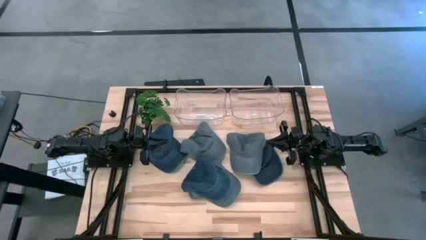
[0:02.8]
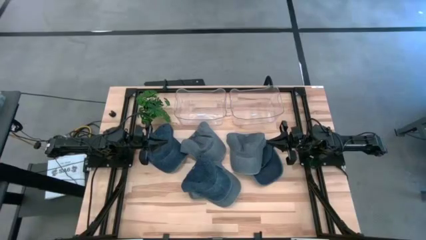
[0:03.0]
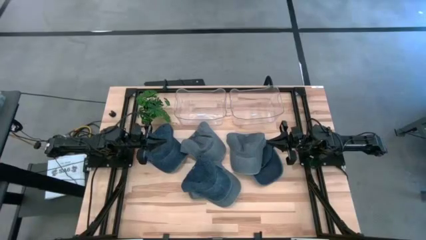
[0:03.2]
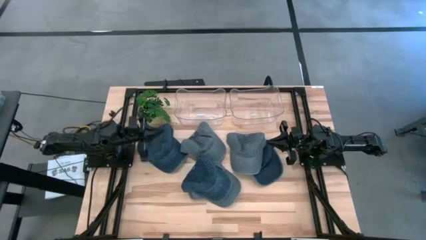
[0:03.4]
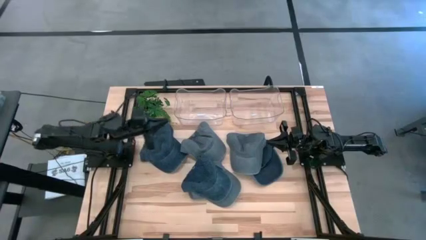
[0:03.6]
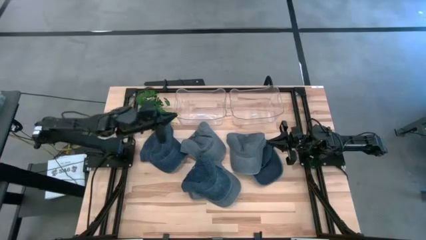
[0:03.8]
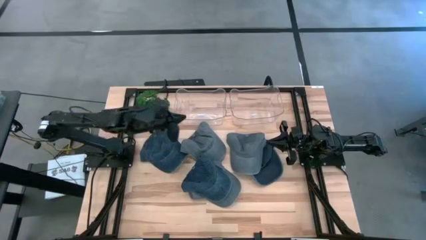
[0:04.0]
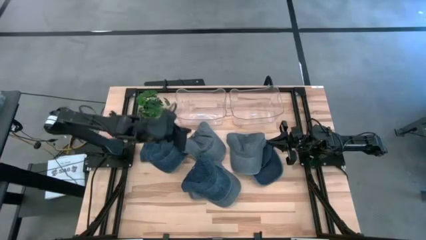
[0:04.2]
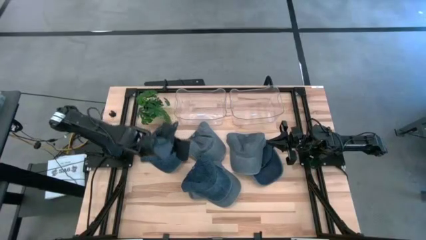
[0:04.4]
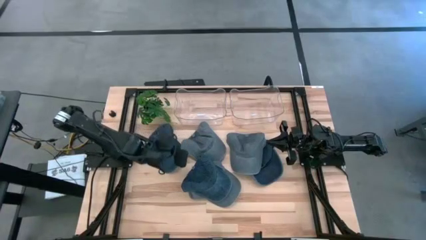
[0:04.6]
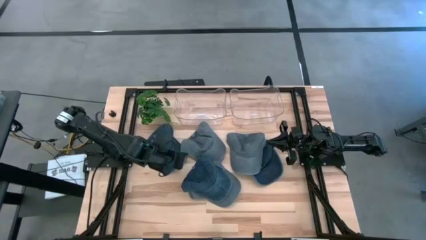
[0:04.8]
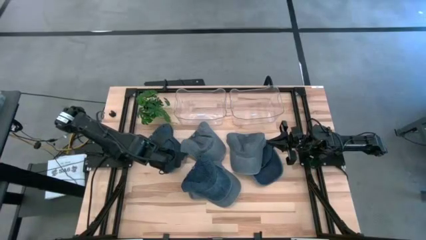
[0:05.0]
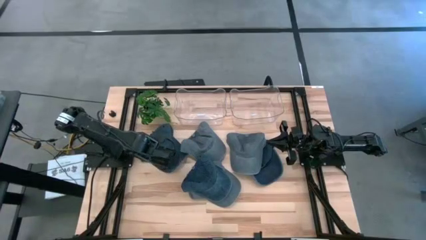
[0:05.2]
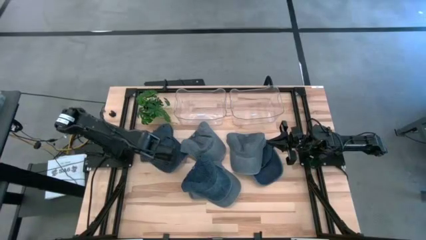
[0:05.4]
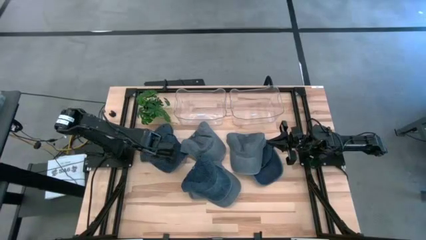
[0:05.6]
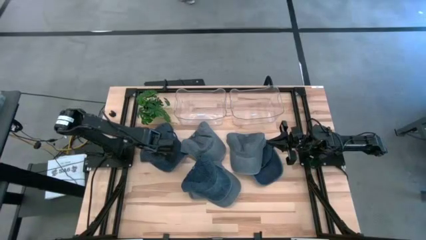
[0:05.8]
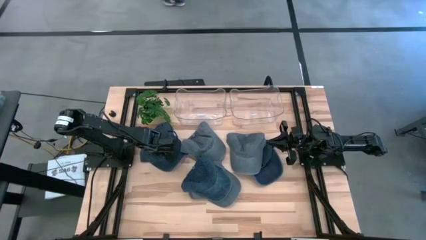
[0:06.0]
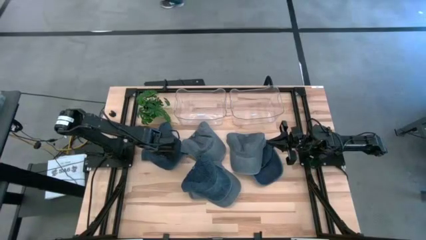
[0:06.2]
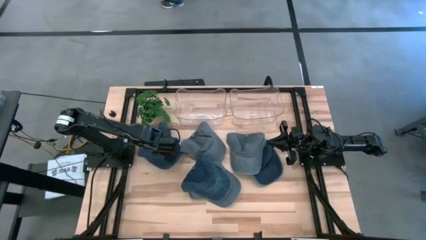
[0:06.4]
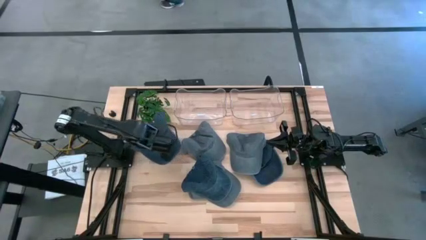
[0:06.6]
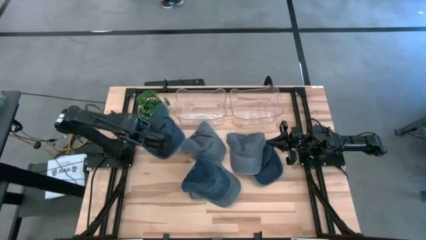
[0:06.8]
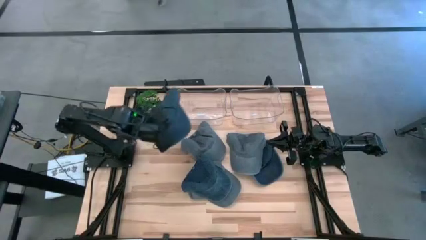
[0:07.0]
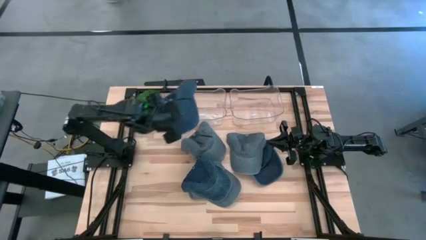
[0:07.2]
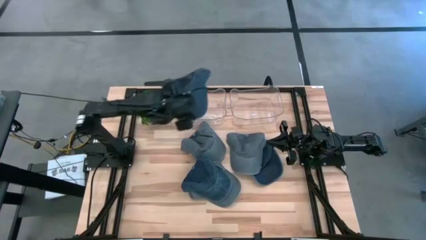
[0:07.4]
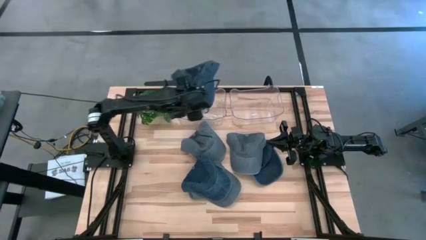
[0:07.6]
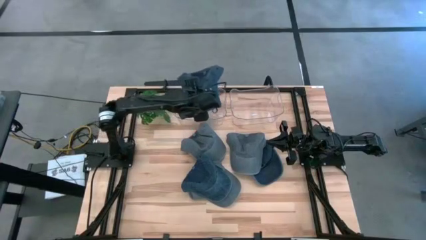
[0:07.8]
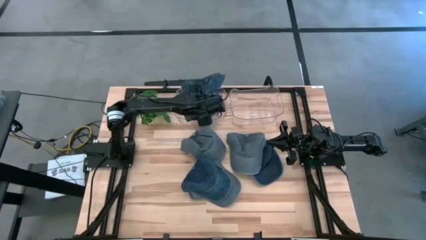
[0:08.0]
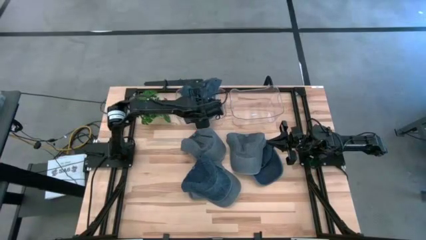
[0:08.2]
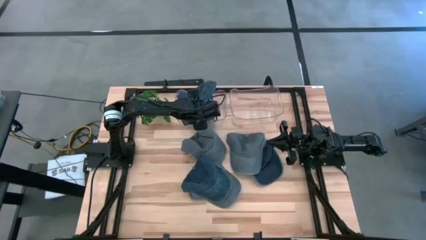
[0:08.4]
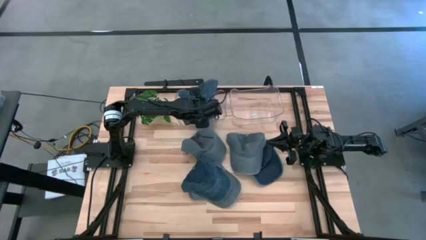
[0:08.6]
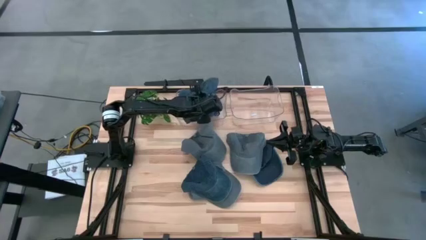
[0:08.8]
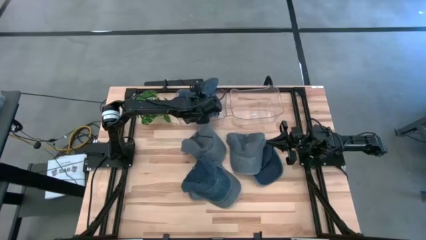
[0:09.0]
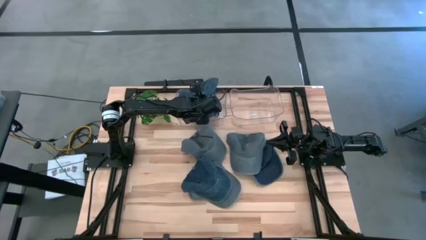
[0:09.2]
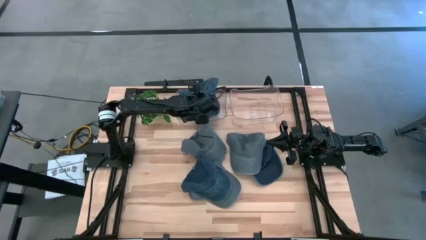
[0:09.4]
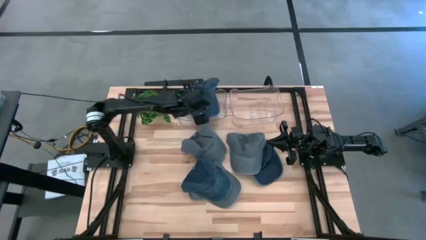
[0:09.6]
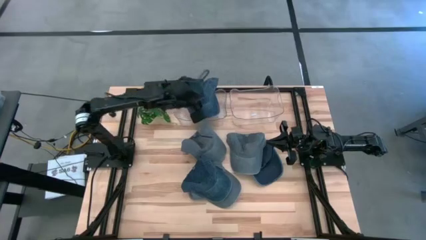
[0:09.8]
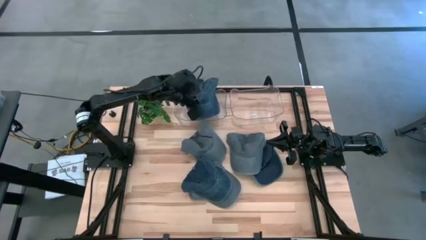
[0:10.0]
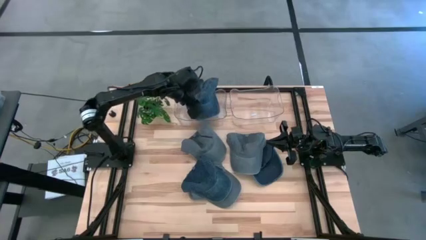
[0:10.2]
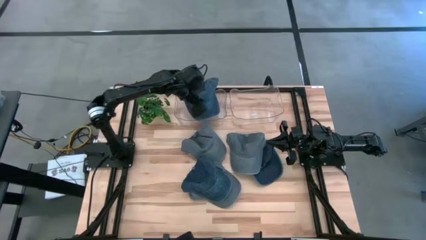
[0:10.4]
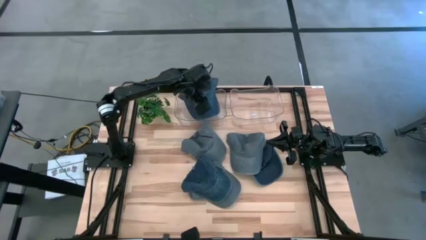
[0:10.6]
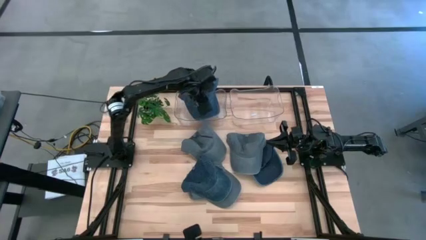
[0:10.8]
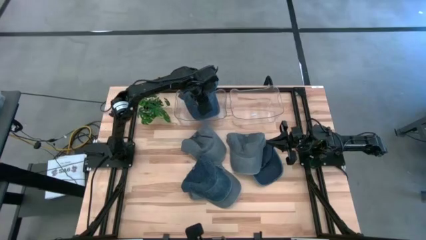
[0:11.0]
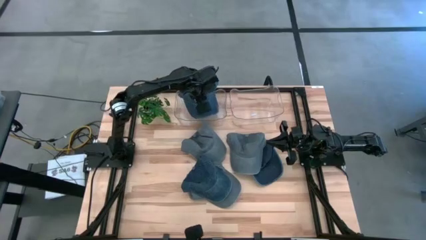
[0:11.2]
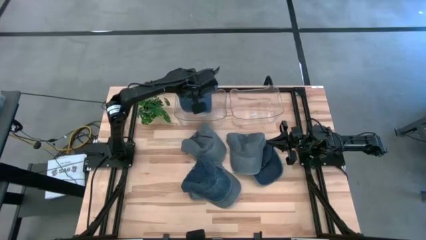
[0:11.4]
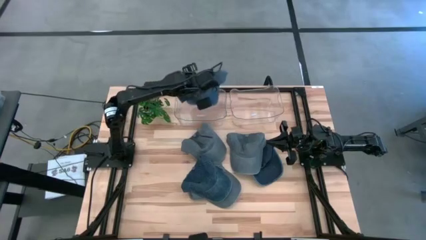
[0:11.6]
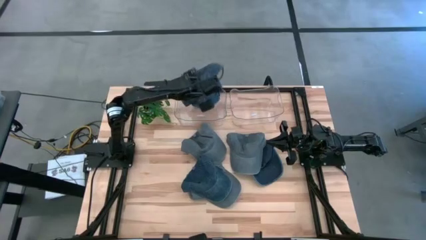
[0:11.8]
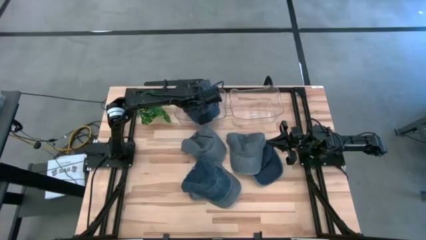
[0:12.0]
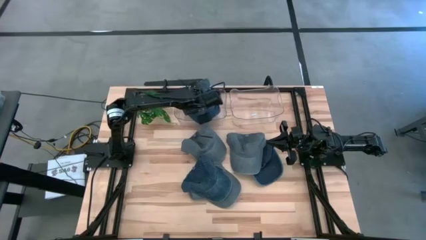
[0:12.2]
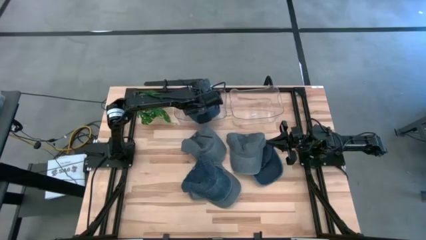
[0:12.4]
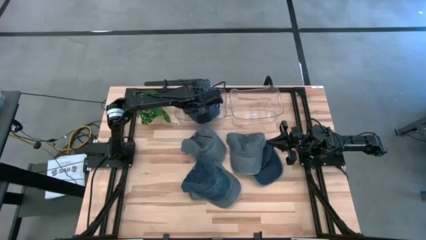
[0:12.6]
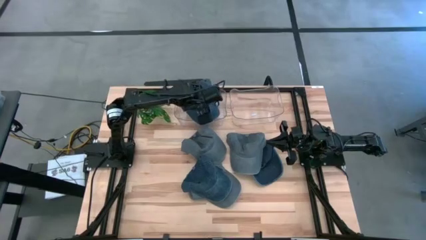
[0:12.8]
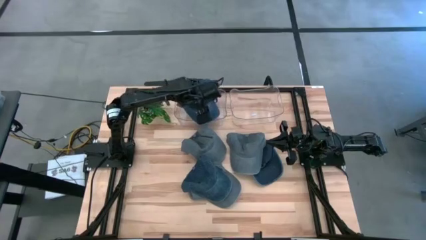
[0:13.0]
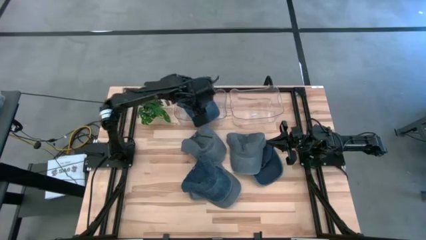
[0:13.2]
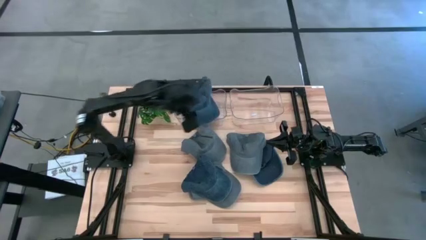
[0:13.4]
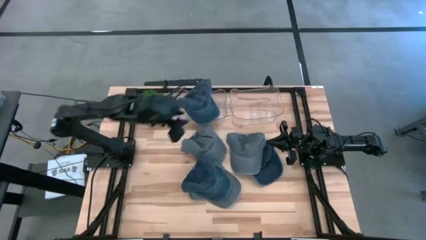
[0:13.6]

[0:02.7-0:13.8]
Task: Pick & Place hat
Put the top left blue cap into the left transparent bin
